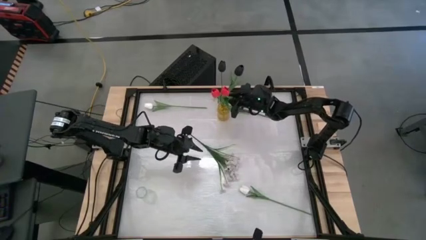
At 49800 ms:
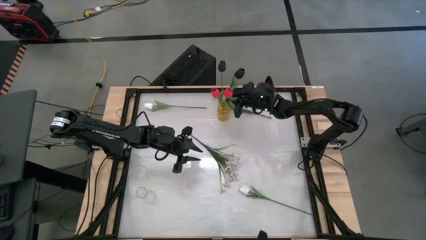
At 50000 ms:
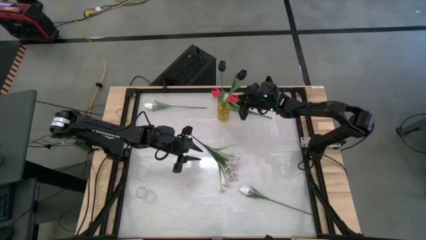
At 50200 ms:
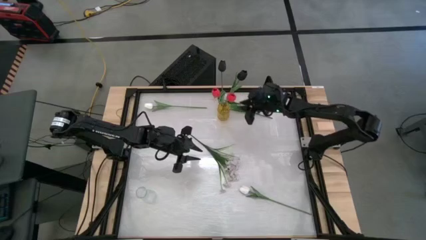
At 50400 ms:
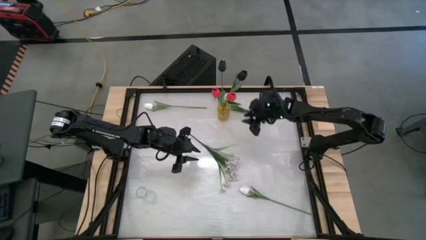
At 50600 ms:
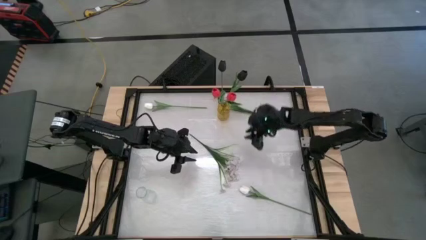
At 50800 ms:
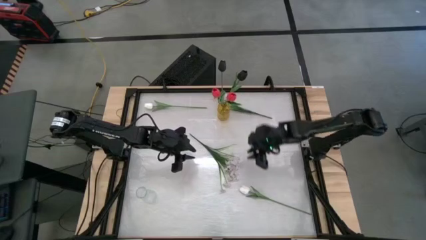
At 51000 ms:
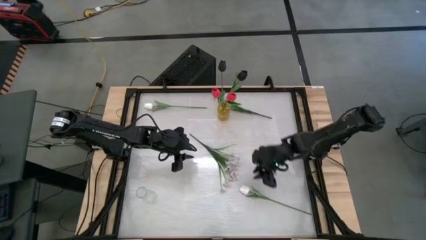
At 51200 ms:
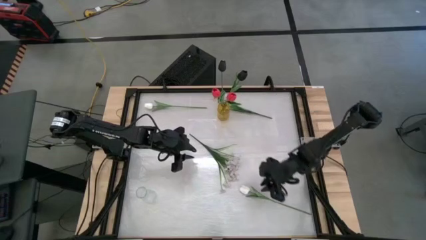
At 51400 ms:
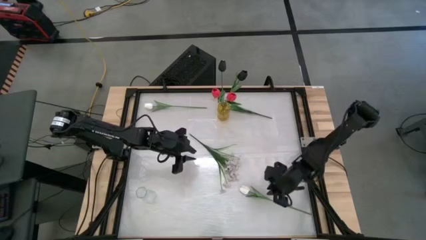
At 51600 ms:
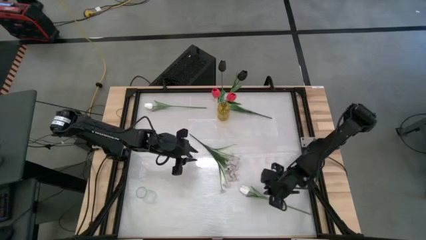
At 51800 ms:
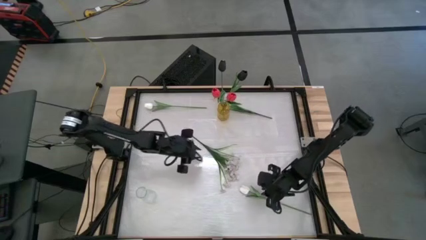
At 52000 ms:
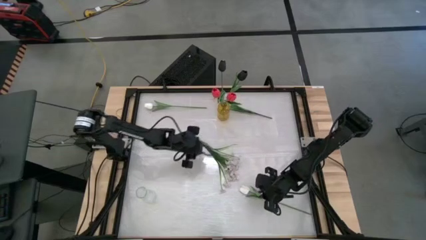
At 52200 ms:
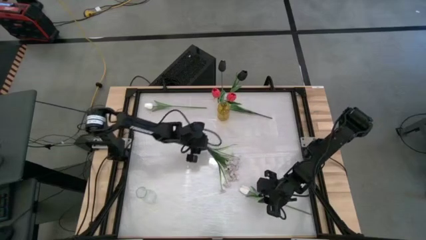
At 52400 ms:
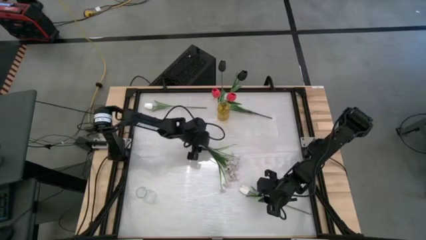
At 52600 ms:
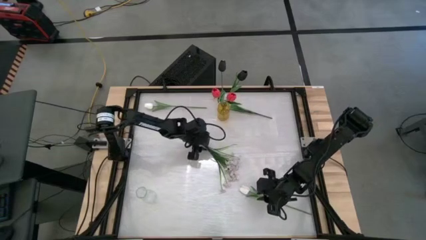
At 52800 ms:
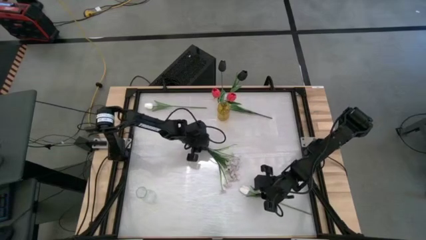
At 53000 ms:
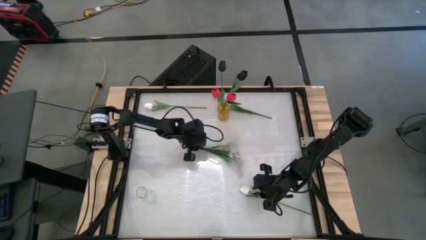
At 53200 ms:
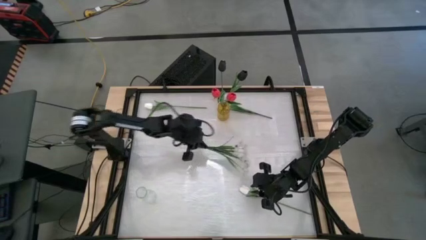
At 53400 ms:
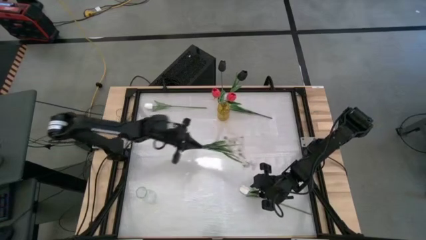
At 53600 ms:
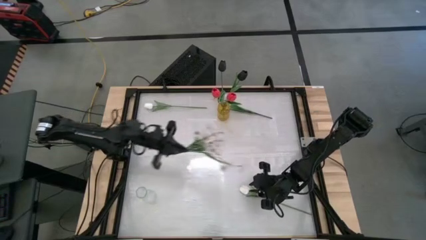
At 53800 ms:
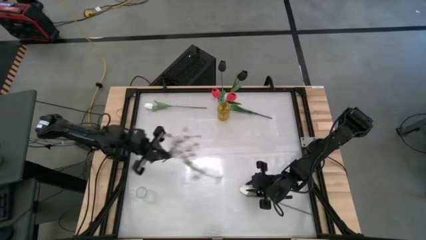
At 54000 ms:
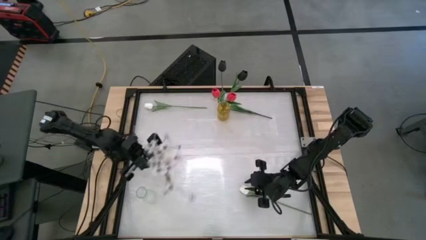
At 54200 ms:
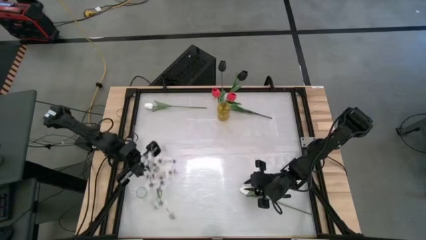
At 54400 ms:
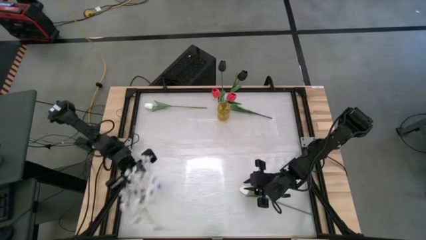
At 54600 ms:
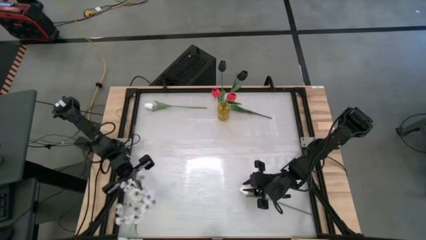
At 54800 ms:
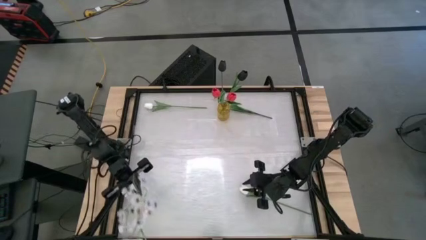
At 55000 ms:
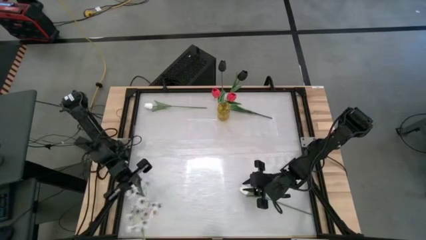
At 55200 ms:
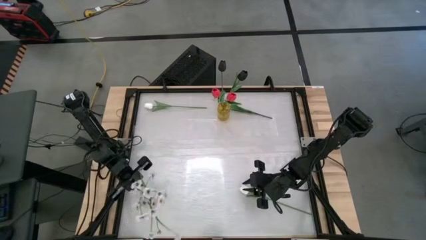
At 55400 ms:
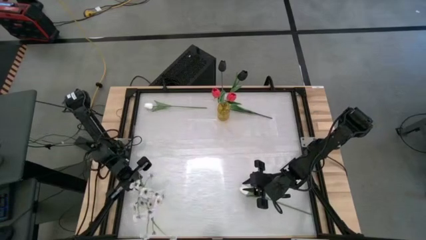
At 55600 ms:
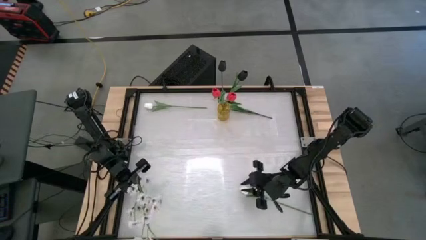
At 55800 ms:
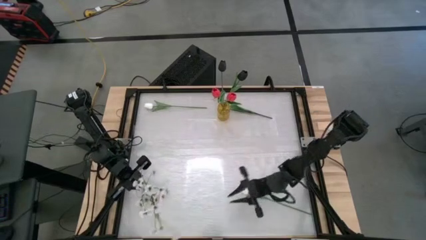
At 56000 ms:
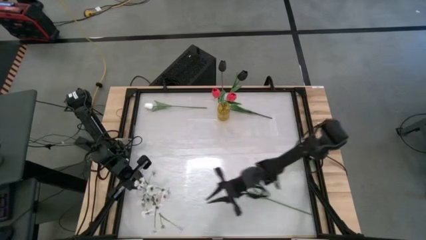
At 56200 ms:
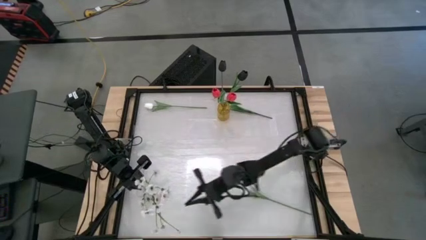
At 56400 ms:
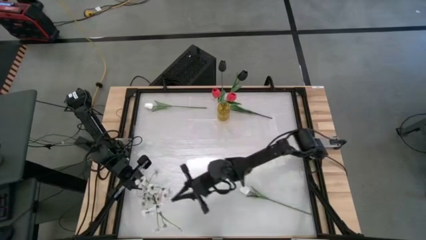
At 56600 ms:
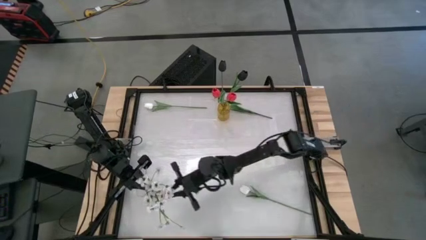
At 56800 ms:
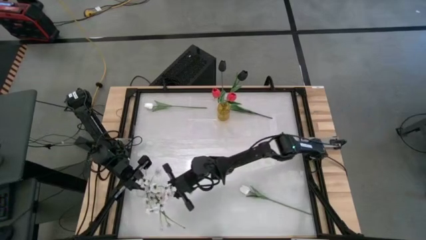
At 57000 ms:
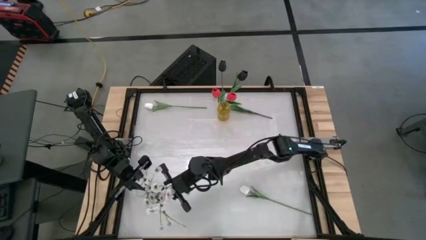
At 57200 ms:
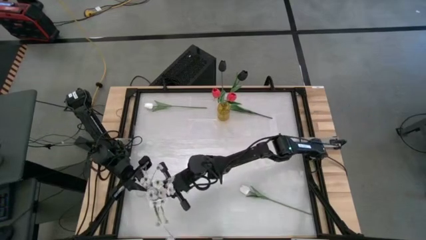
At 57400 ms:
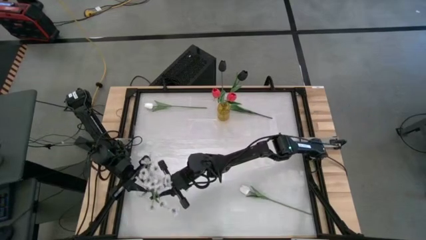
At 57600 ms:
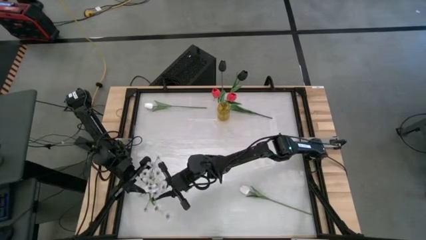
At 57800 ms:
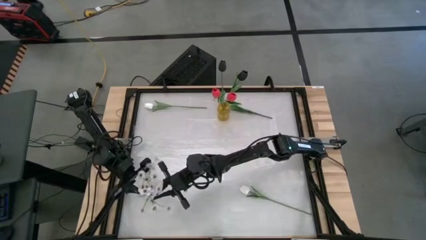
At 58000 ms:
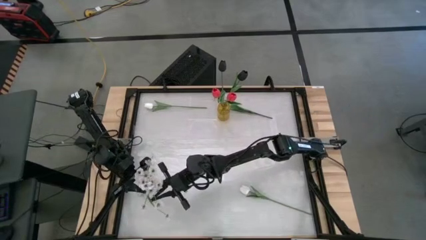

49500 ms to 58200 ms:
Task: Sort flowers into vase by color
Put the bottom white flowers into the transparent vase

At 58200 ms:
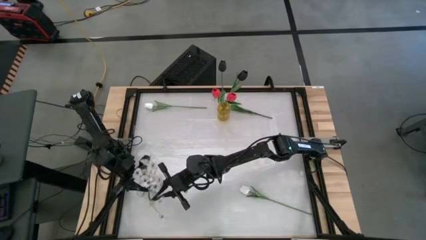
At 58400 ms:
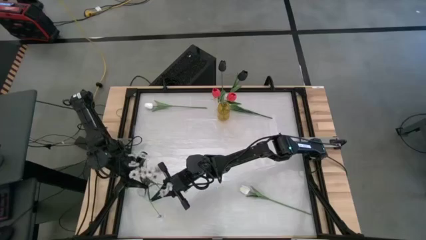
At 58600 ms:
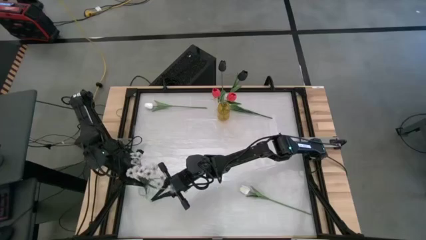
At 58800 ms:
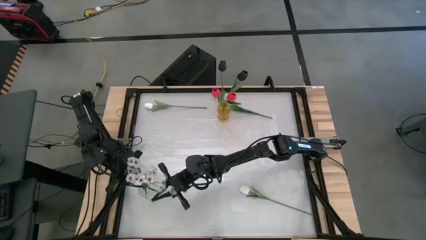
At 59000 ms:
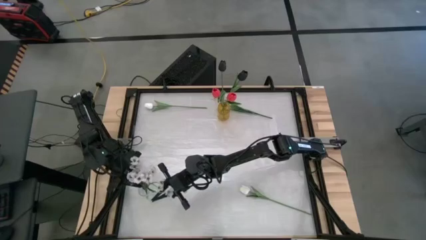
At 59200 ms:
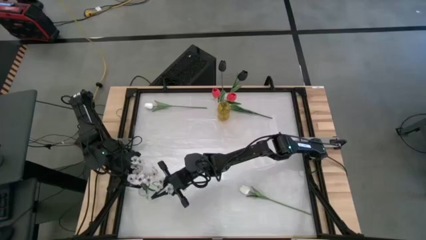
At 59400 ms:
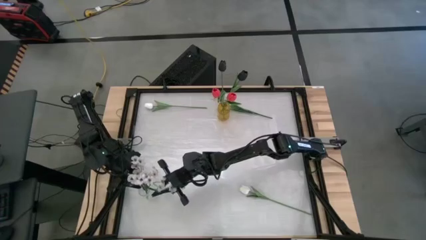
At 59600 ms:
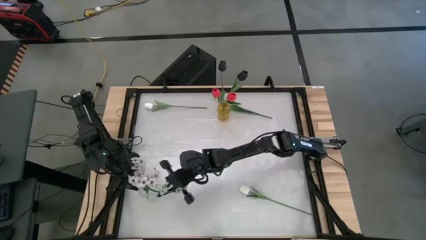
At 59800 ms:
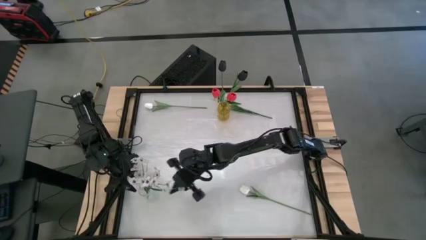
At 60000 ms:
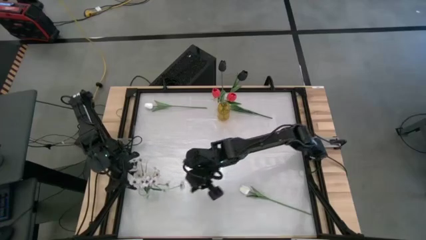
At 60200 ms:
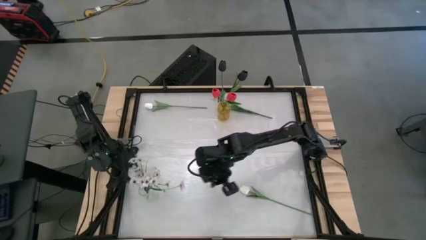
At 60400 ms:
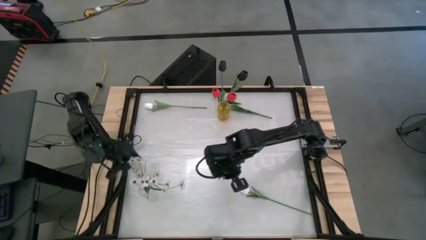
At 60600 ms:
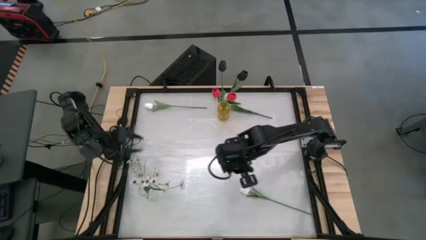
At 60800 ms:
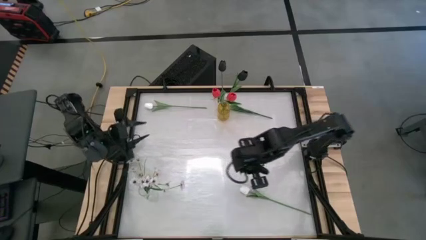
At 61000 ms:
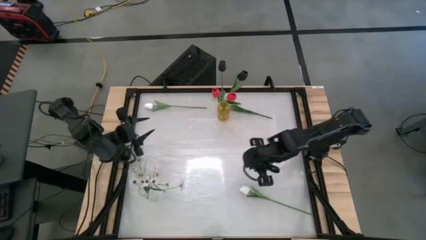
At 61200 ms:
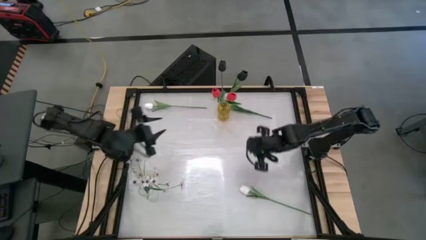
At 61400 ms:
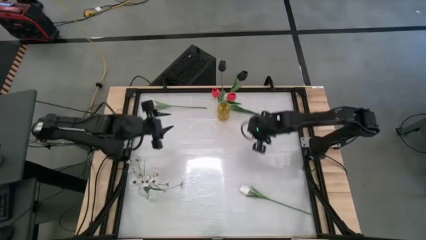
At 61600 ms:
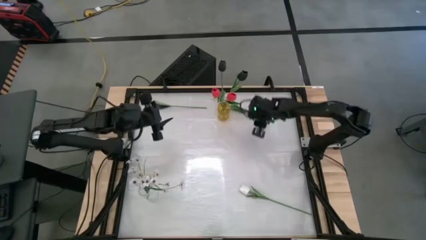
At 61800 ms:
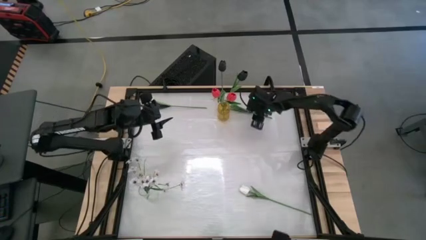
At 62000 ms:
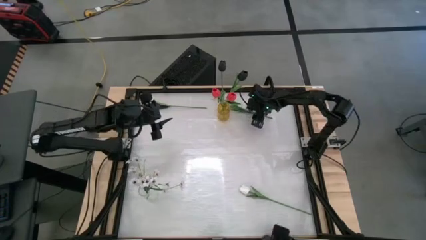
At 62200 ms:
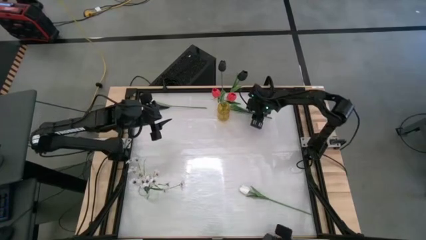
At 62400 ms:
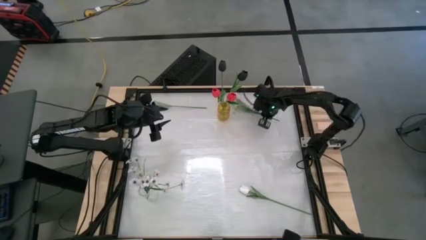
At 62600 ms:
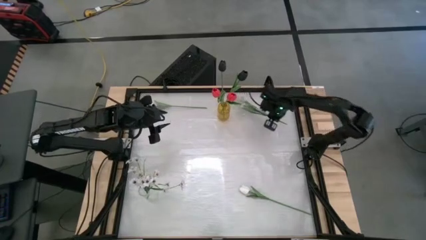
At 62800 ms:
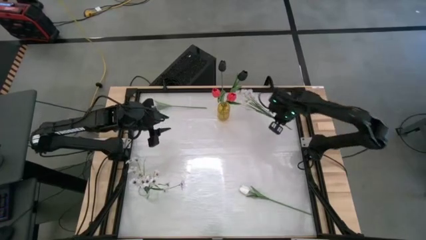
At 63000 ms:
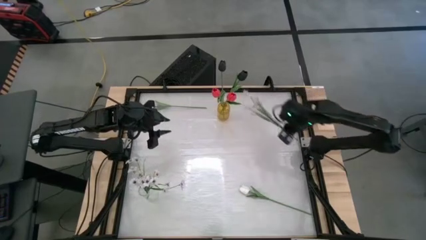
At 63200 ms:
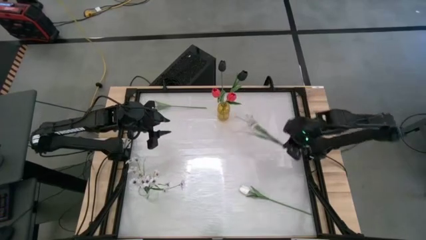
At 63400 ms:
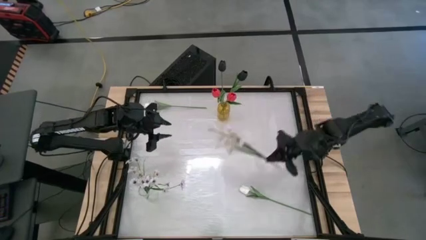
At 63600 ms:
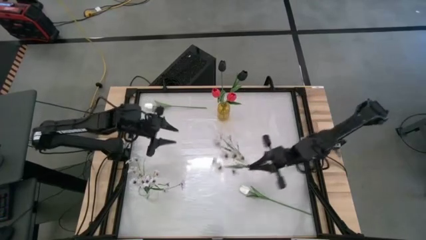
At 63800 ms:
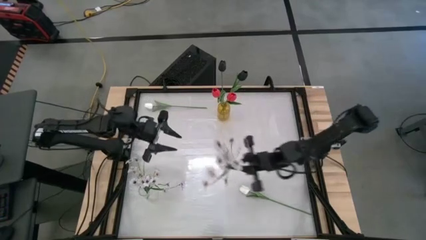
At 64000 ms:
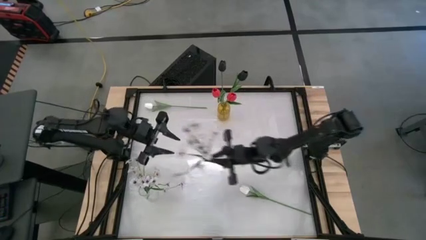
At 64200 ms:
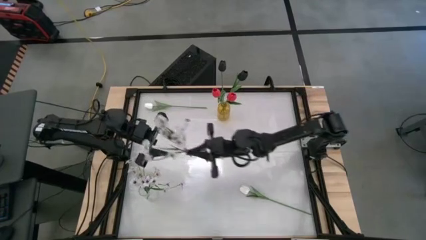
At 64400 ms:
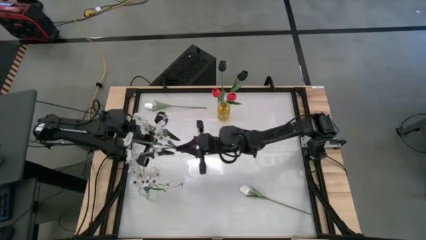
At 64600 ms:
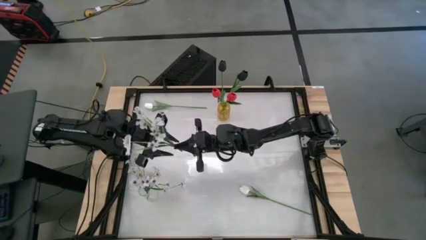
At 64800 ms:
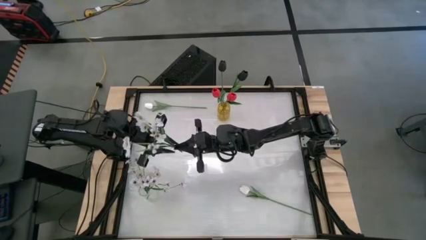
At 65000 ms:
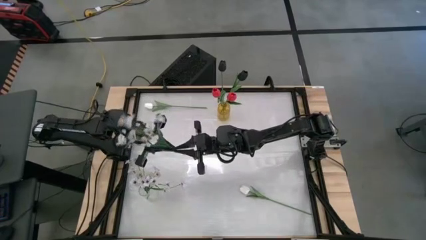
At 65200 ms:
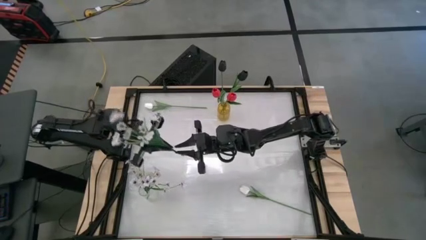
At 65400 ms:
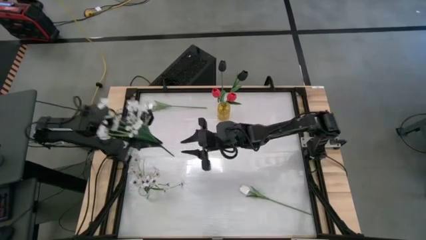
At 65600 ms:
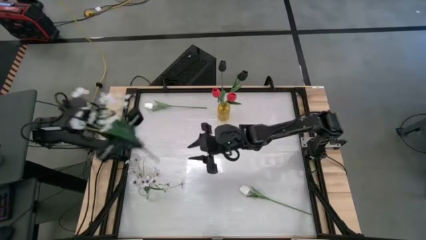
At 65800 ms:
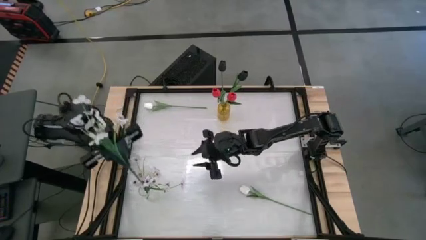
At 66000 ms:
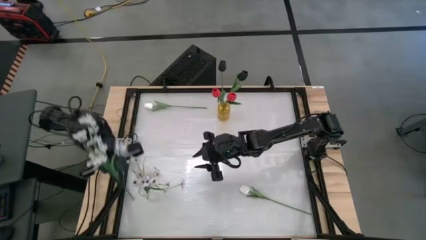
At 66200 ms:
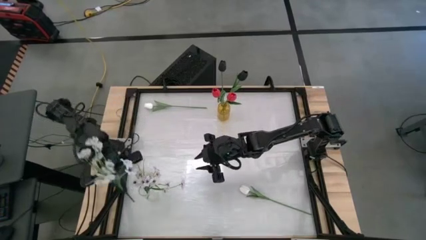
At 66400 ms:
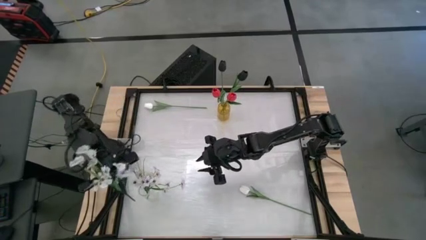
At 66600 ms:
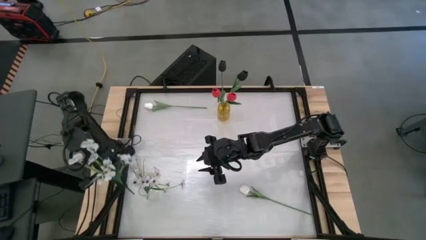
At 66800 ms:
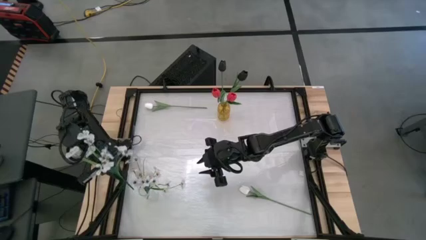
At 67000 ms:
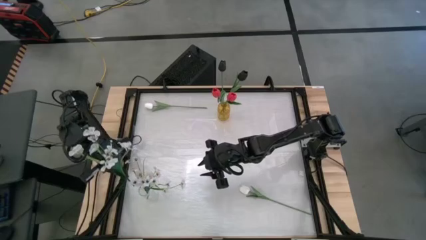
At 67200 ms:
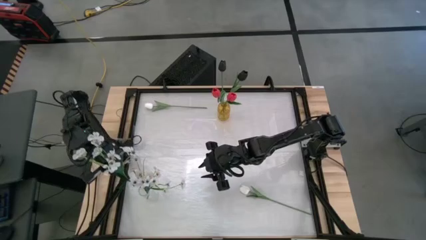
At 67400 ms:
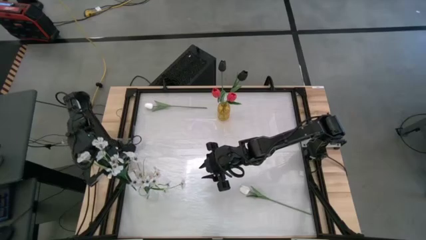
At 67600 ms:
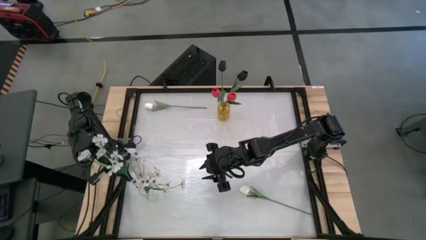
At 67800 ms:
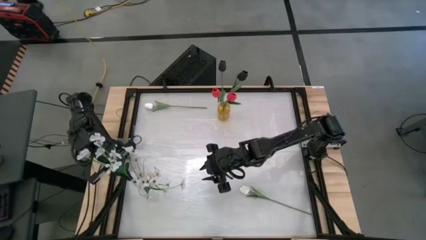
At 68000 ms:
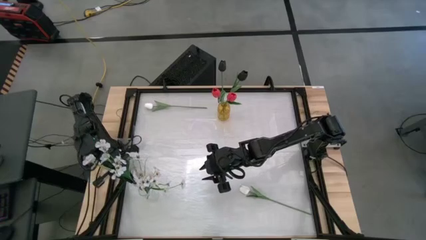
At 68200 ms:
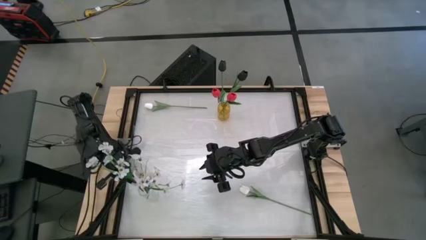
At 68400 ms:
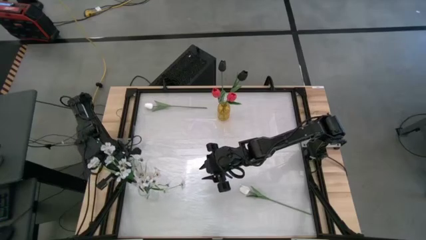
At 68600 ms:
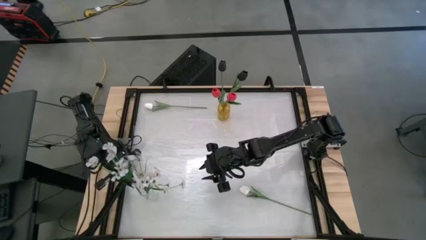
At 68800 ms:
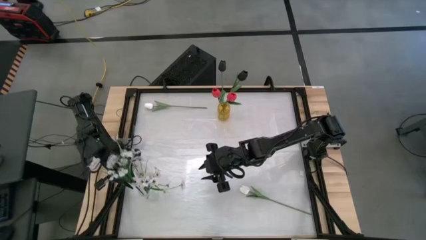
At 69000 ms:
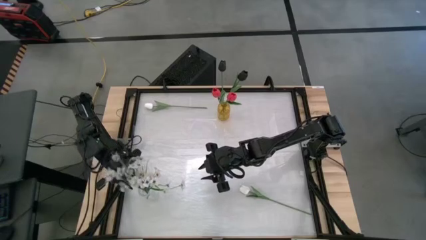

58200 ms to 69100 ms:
Put the white flowers into the transparent vase
